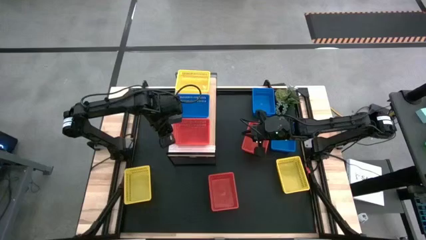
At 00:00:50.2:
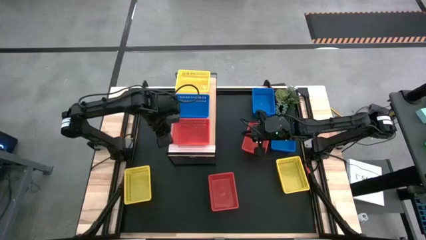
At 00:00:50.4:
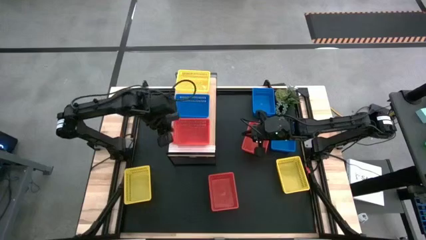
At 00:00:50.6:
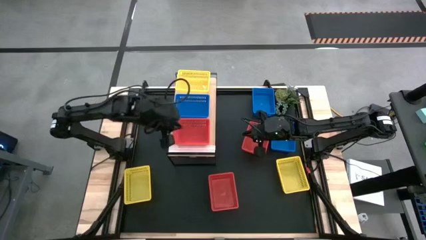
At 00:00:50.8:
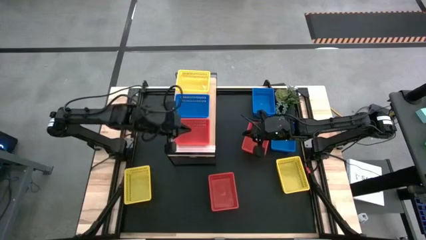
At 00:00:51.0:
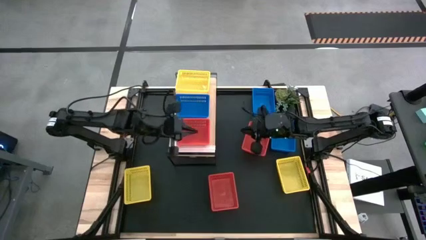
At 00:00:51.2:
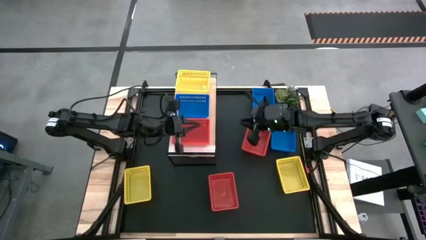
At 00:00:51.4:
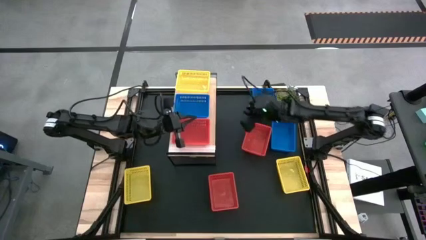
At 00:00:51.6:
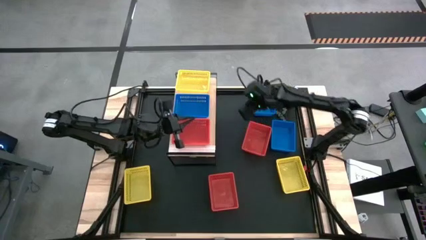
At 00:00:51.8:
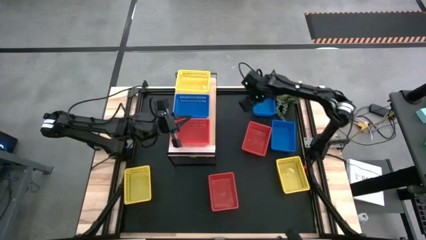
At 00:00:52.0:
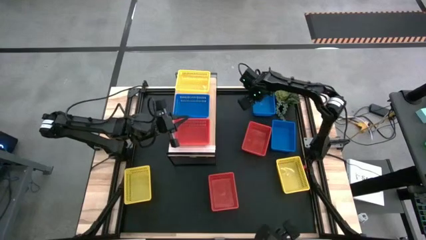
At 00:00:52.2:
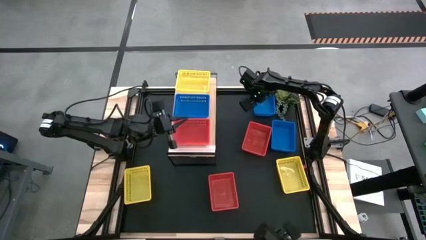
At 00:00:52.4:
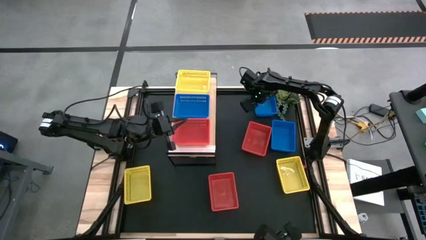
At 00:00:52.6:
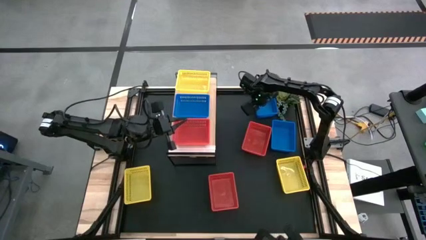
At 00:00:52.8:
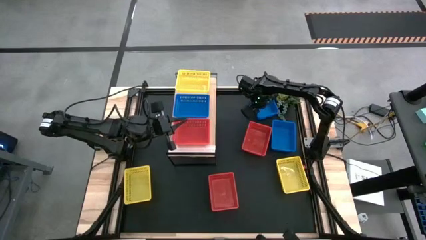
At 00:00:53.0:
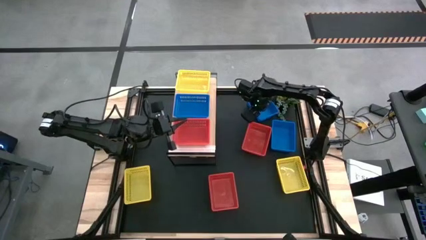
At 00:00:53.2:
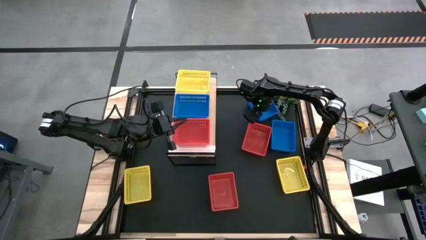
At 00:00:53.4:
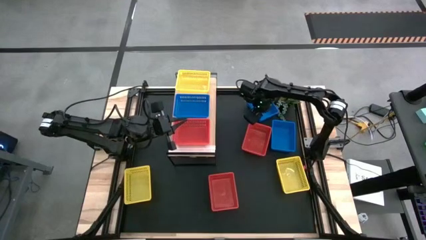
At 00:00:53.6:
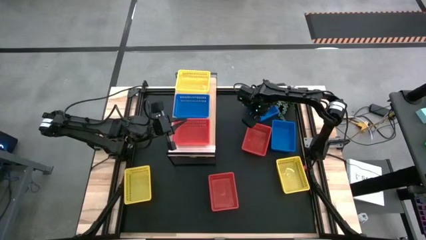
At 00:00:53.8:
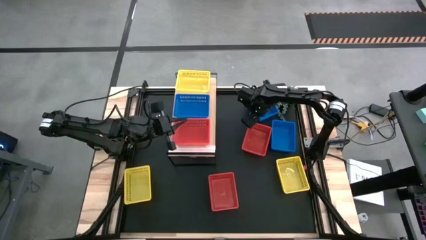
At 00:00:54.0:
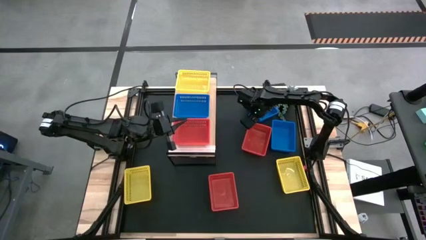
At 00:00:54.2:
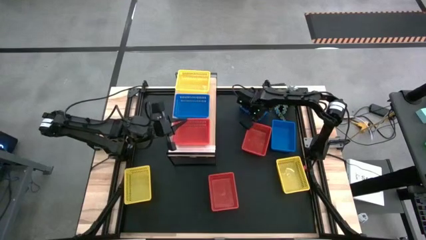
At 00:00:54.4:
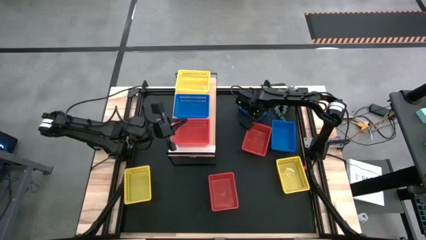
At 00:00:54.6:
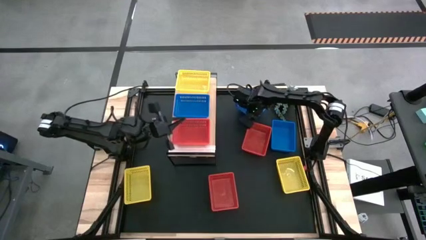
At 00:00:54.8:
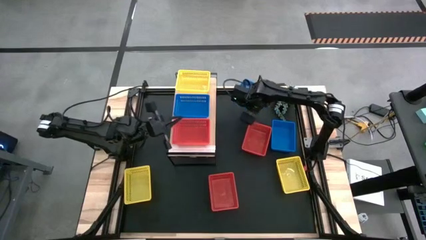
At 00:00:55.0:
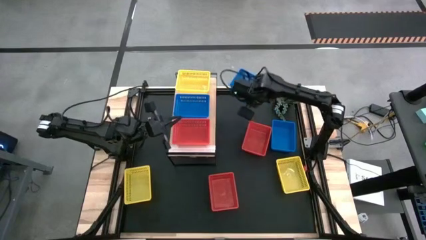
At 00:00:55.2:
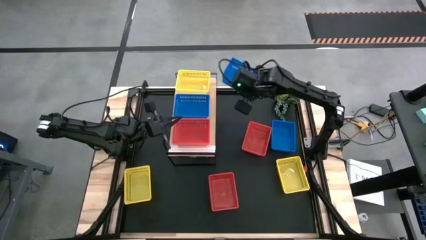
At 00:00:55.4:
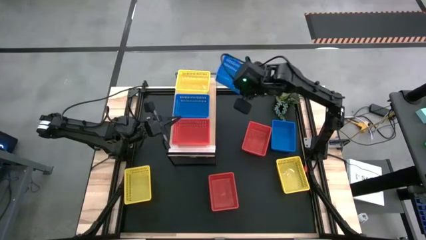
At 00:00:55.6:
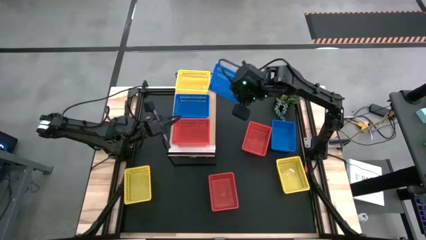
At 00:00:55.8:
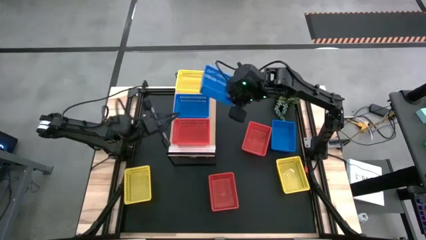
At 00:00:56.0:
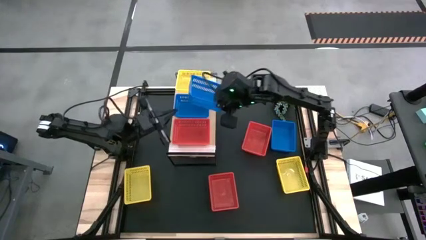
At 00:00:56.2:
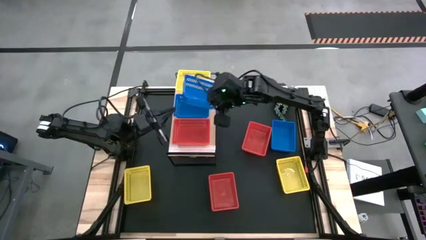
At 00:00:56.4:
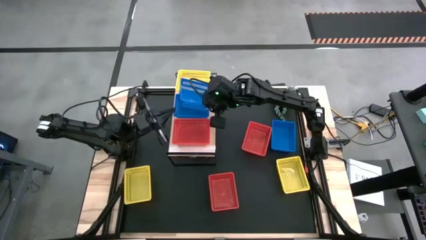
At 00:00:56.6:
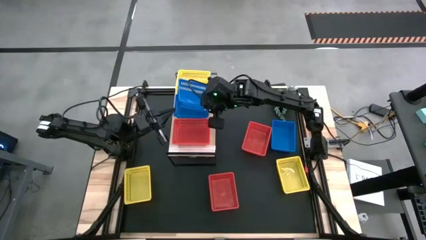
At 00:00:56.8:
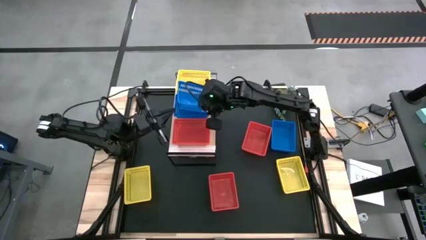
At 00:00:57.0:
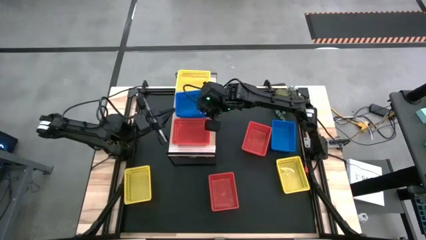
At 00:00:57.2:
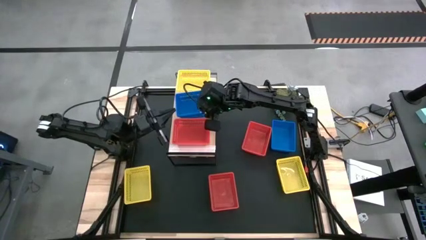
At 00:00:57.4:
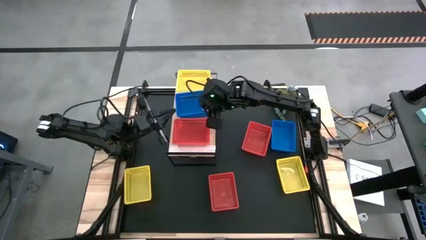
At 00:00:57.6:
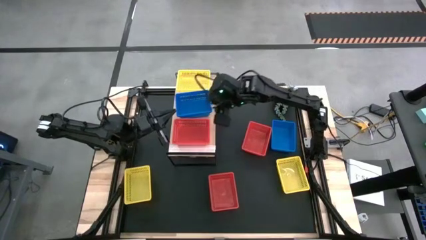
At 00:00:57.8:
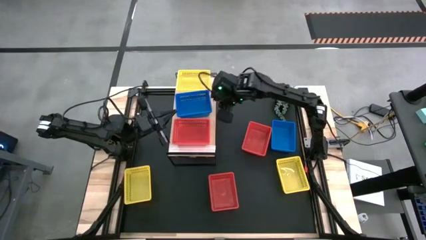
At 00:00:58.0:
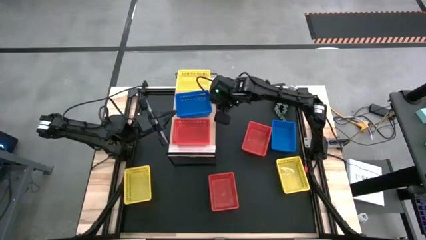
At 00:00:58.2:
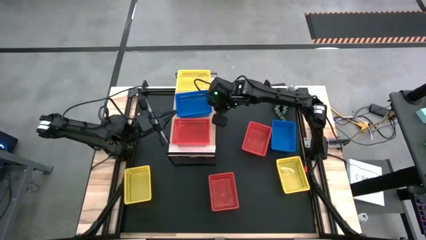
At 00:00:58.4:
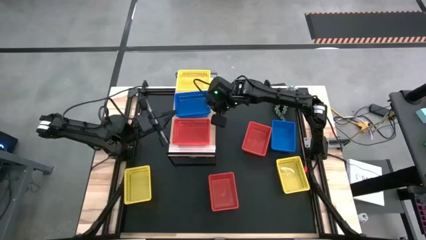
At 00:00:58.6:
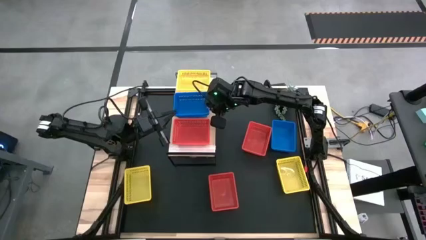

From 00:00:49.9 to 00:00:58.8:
Task: Stack baskets on shelf by color
Stack the top blue bin on top of the blue bin on the shelf

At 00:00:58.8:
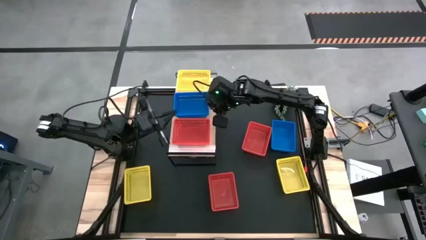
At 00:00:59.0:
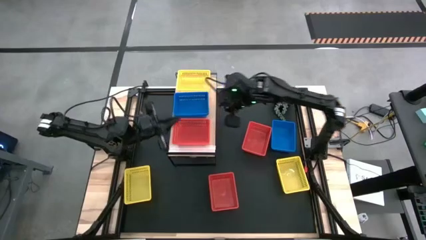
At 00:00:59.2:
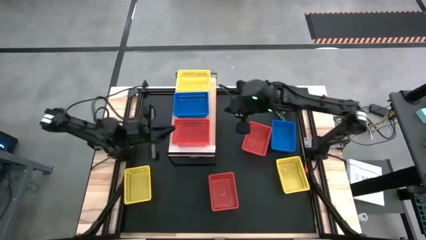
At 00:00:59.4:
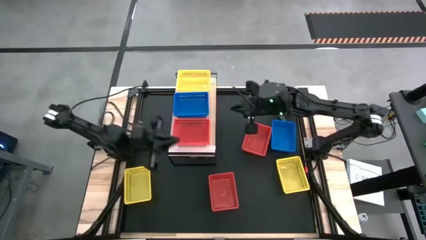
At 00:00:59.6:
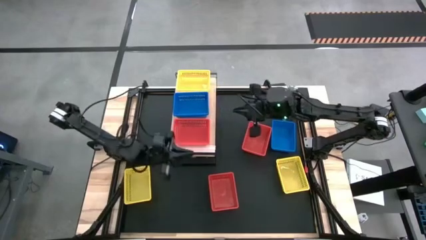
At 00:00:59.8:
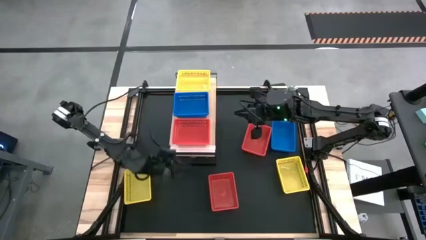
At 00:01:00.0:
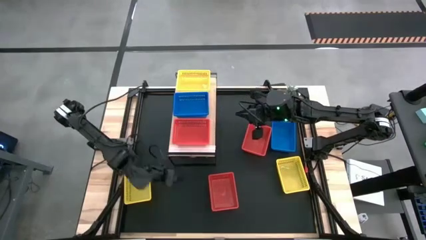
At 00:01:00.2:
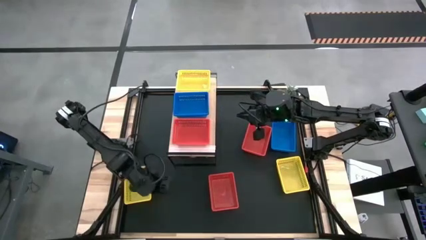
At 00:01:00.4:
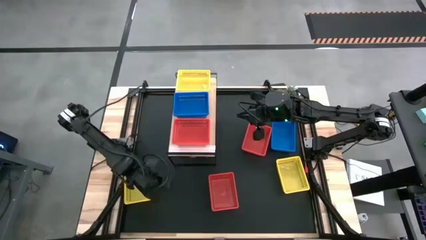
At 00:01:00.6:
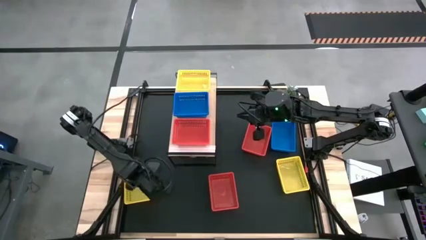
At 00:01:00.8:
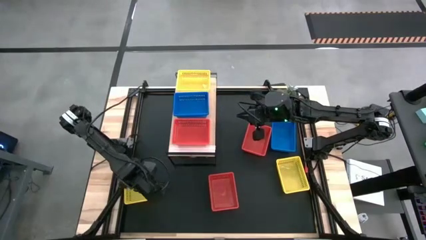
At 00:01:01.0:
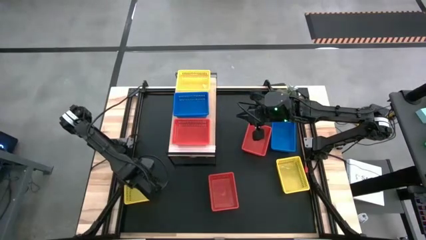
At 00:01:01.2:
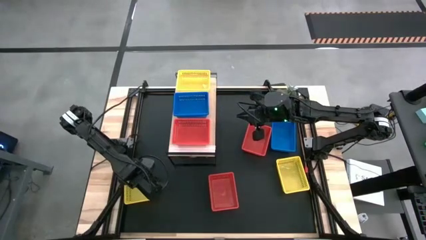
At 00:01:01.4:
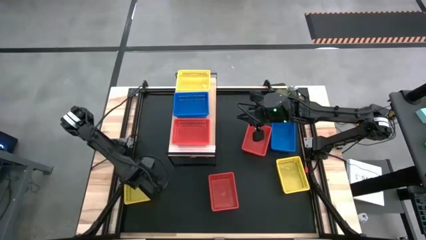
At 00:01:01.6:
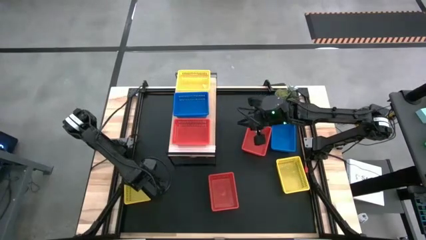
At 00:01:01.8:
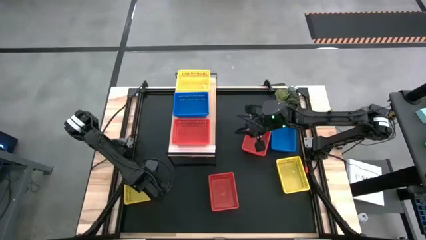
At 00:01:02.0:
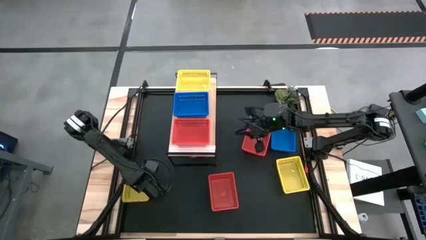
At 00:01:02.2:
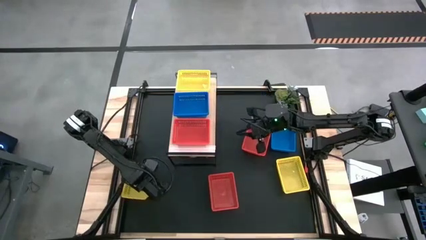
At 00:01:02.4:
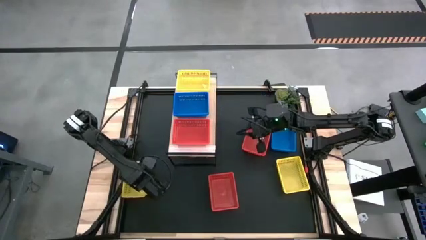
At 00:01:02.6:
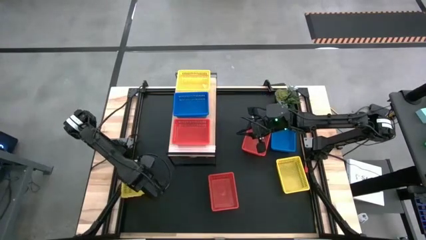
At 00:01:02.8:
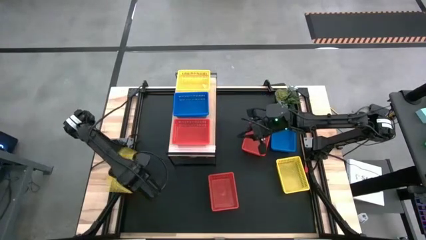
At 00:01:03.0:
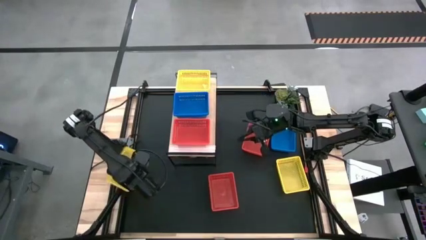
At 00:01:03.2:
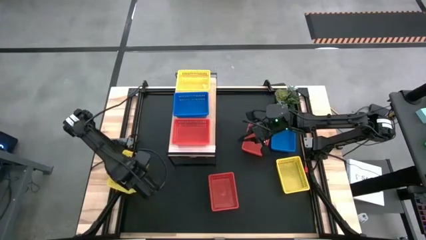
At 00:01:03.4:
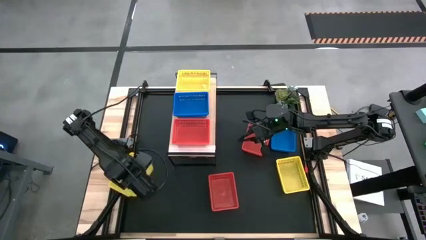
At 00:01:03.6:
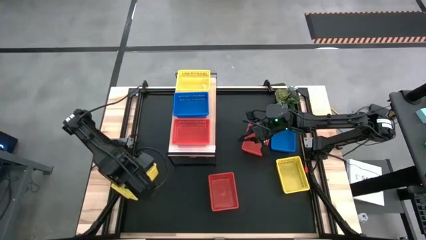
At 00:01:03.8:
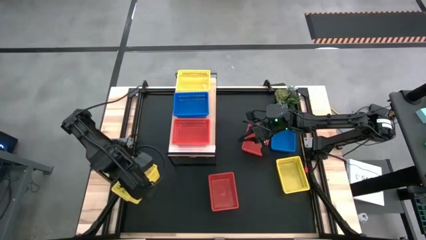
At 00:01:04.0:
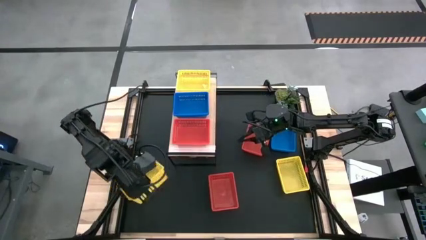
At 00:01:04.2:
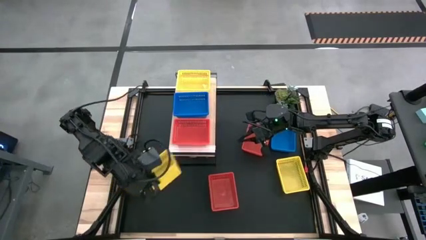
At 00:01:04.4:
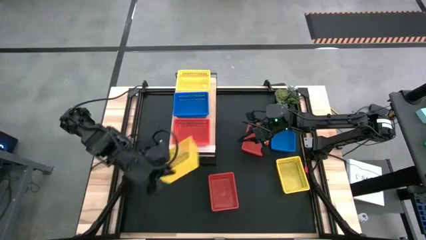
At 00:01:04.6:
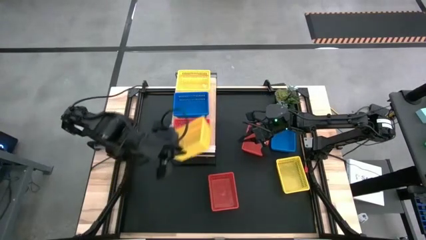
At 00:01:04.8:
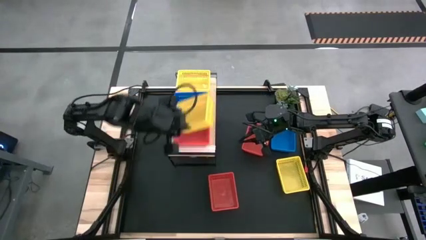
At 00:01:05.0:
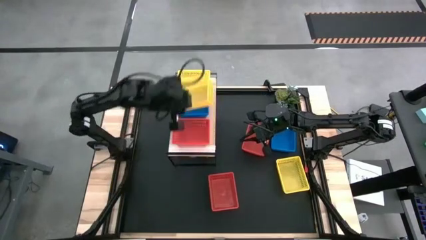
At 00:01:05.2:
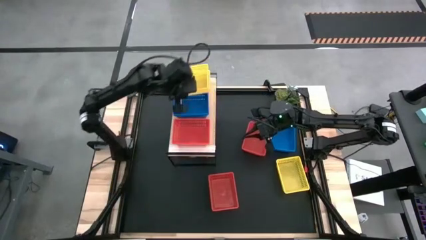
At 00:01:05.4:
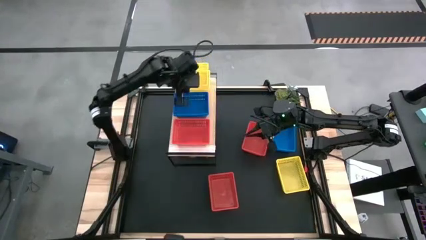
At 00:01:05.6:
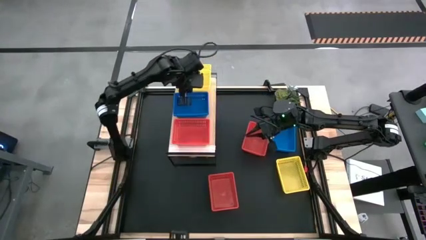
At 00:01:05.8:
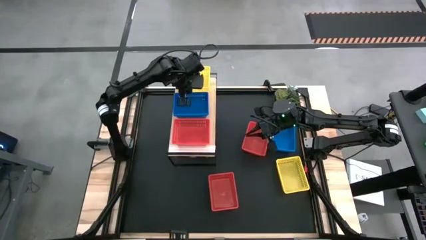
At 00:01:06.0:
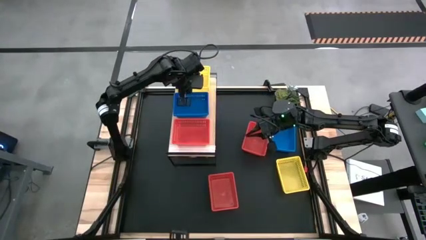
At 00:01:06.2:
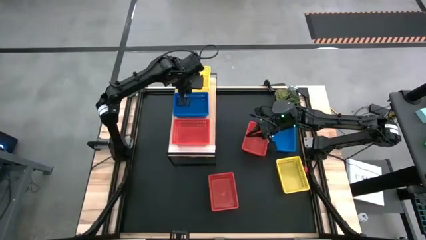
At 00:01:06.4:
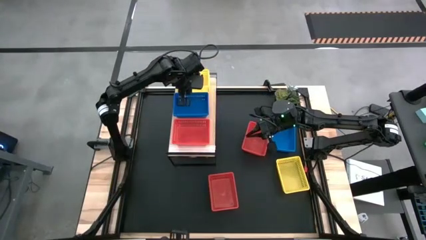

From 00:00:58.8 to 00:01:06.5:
Stack the left yellow bin on top of the yellow bin on the shelf
